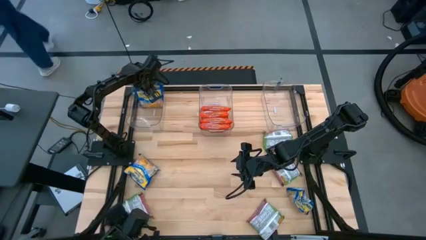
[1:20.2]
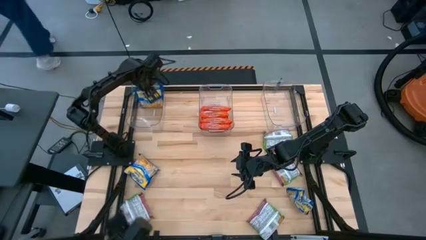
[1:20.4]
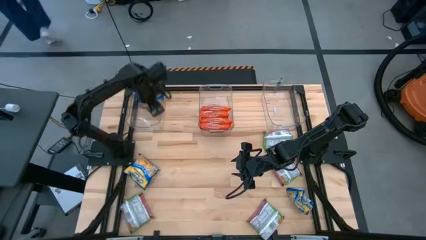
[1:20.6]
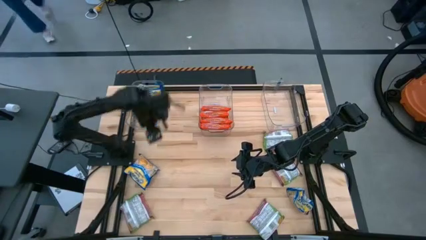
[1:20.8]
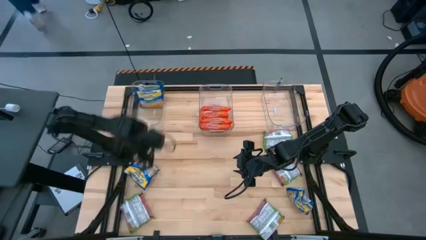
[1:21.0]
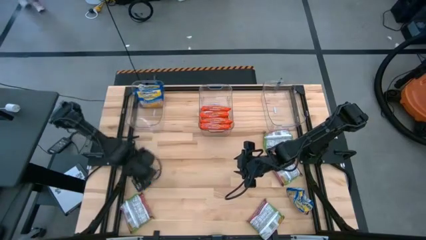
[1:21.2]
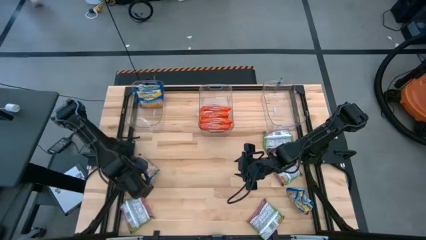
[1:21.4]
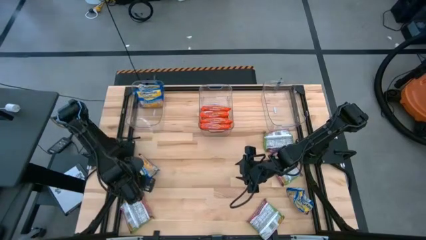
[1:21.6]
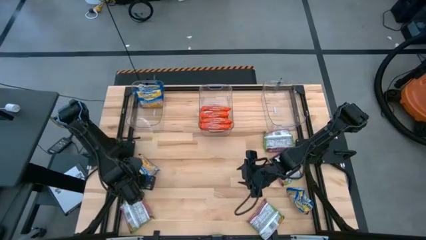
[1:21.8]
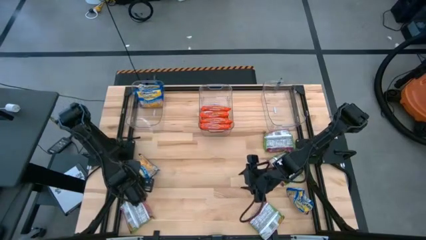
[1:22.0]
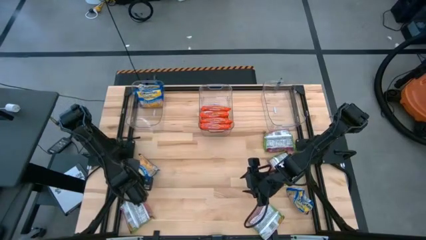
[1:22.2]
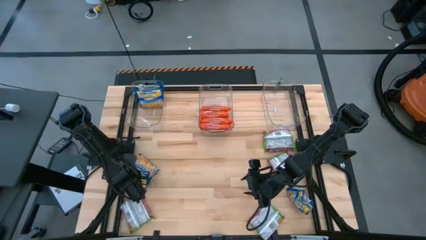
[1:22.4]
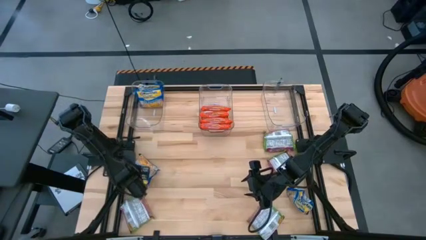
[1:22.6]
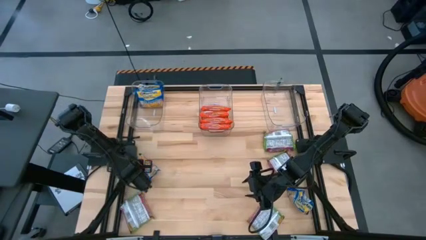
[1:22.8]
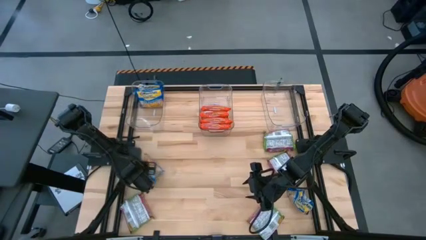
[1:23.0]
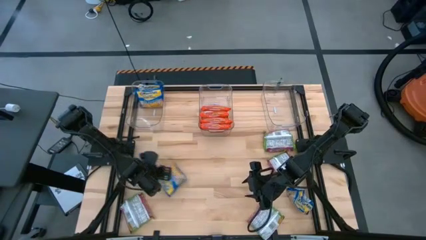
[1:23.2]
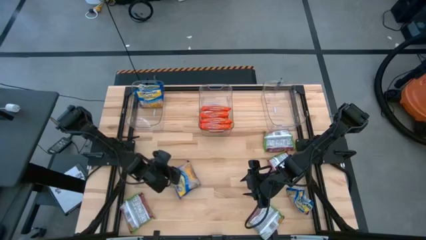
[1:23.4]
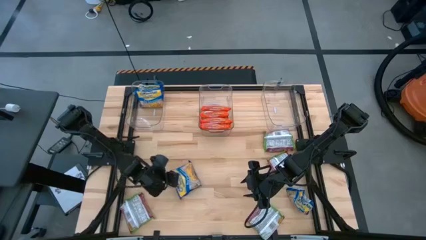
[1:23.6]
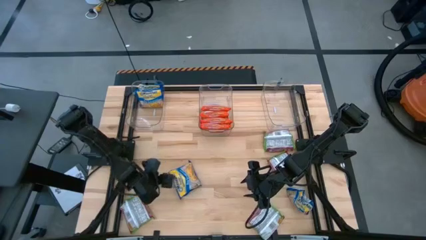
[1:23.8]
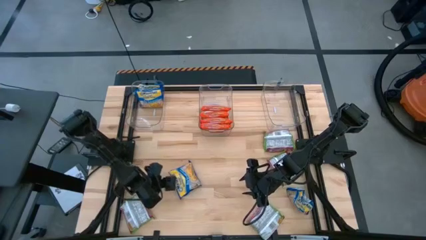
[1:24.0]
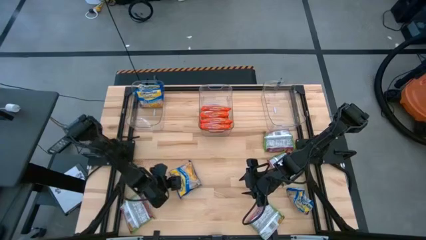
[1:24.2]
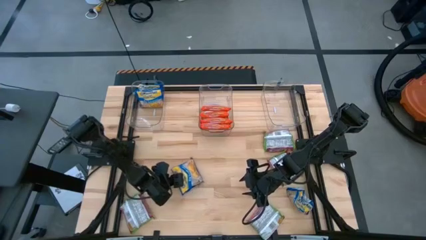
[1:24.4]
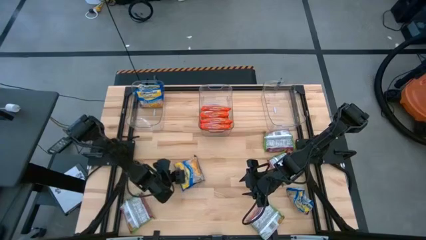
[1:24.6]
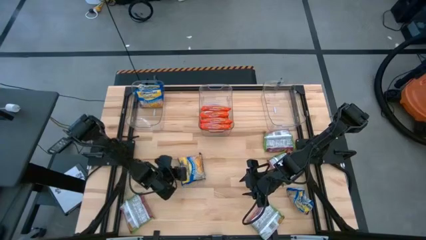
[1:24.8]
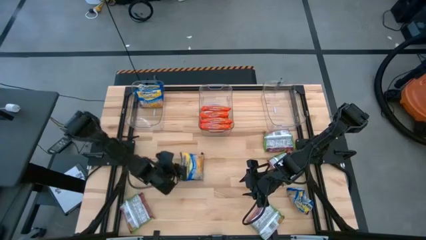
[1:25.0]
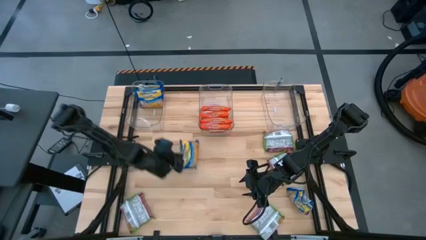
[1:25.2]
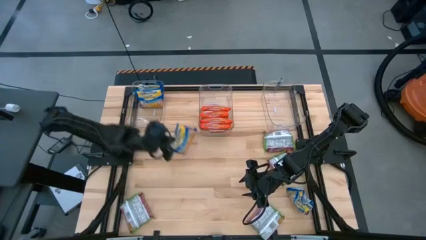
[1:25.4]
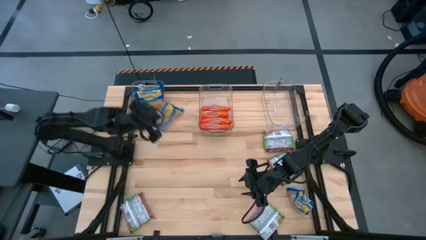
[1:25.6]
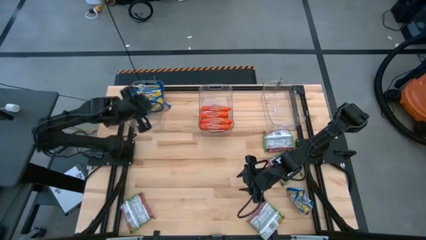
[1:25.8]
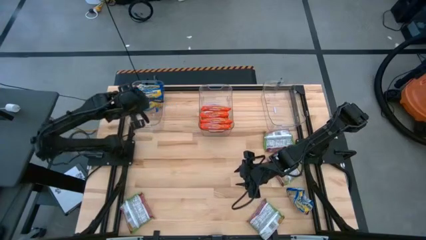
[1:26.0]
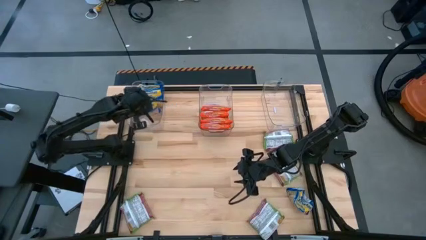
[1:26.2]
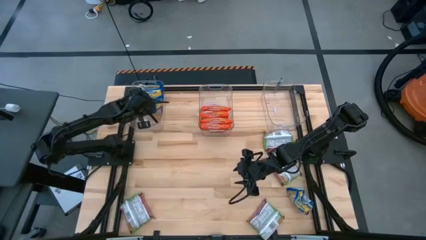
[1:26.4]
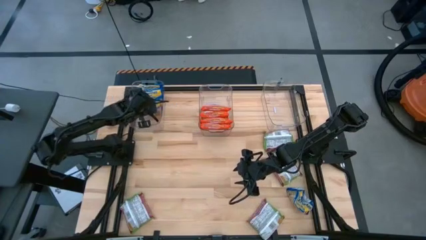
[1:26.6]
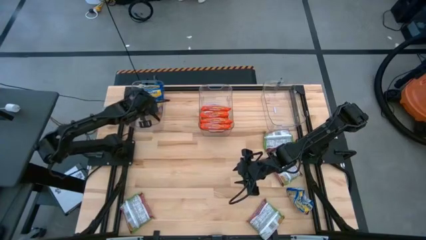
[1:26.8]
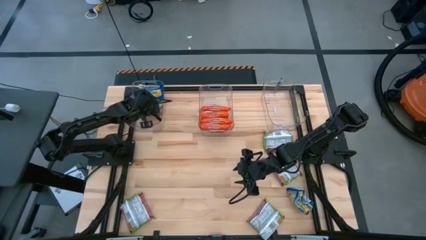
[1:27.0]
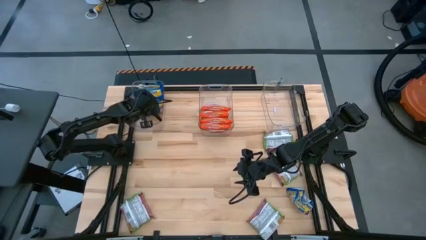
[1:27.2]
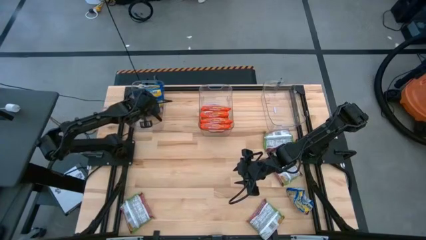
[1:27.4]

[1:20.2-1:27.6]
Task: Sort Maruchan noodles
Put the blue noodle pack into the left transparent bin

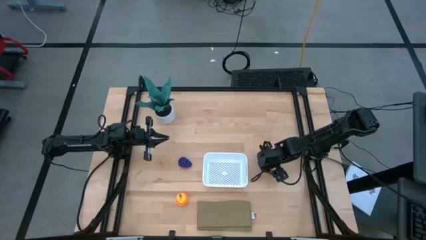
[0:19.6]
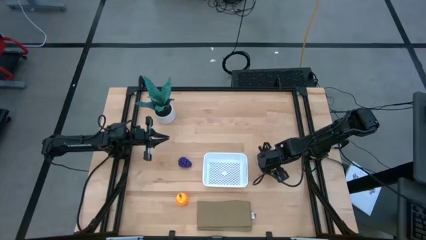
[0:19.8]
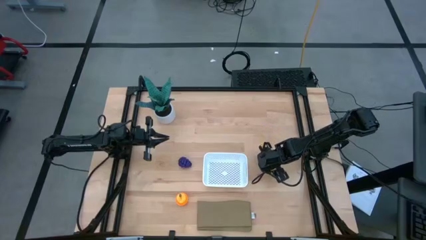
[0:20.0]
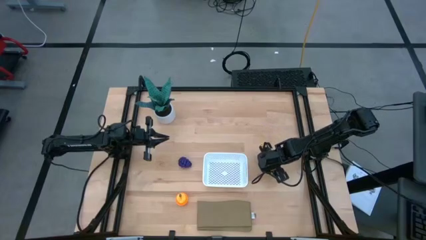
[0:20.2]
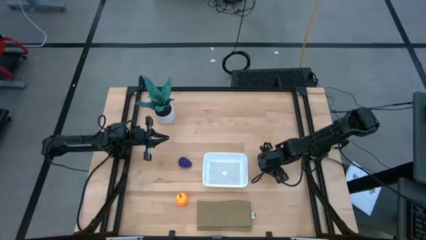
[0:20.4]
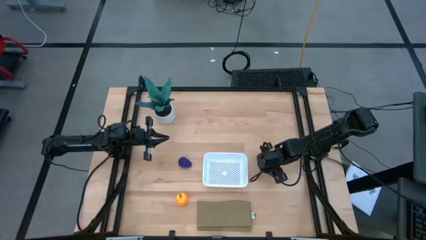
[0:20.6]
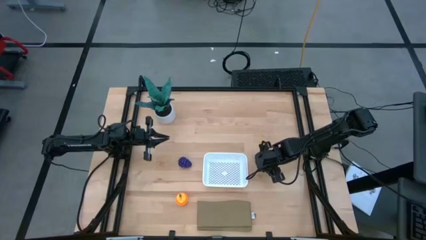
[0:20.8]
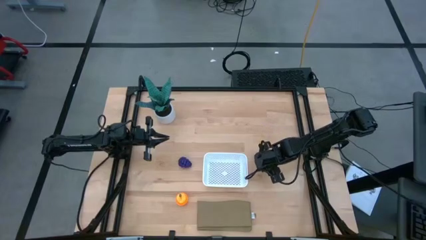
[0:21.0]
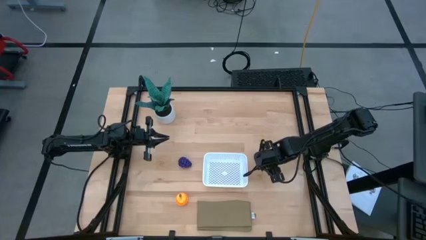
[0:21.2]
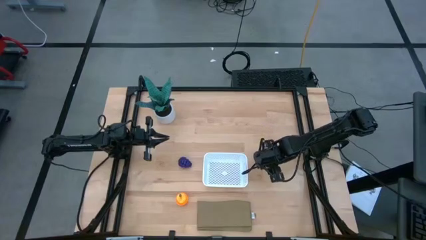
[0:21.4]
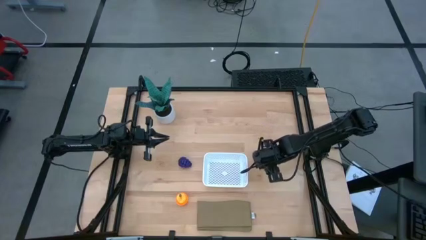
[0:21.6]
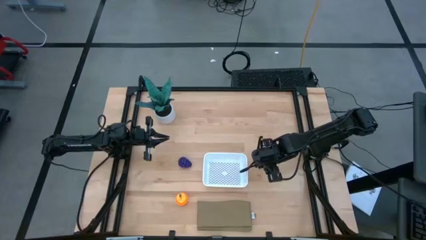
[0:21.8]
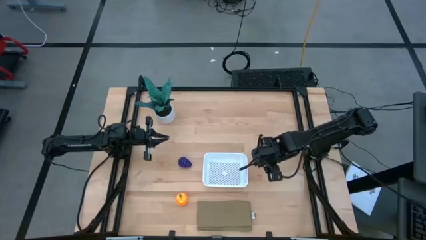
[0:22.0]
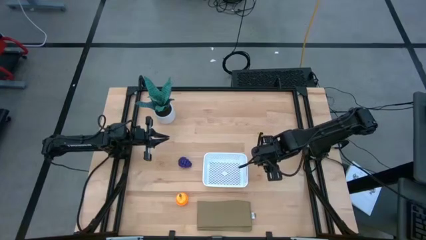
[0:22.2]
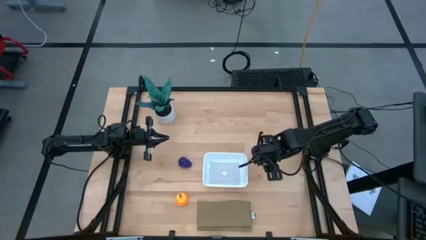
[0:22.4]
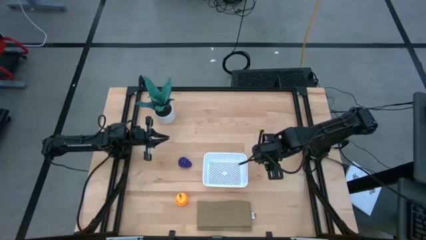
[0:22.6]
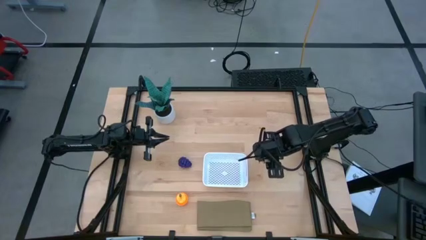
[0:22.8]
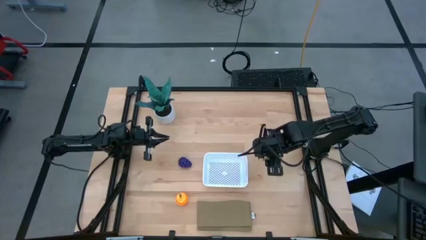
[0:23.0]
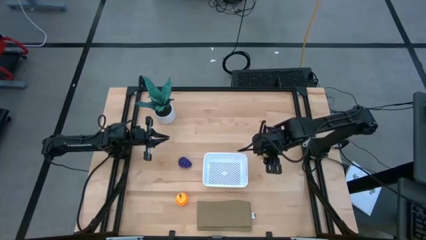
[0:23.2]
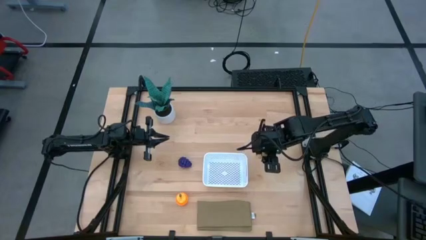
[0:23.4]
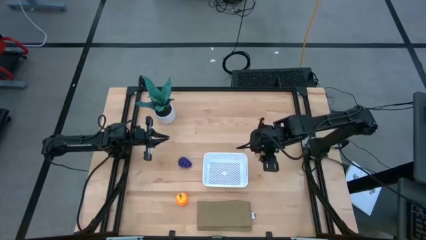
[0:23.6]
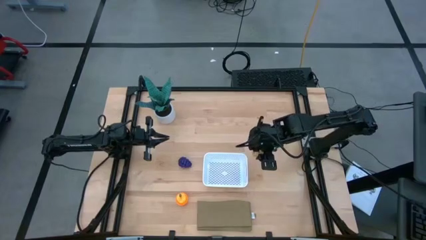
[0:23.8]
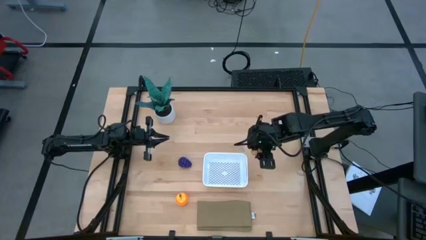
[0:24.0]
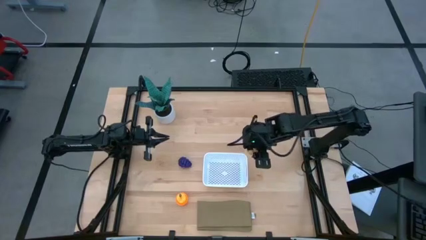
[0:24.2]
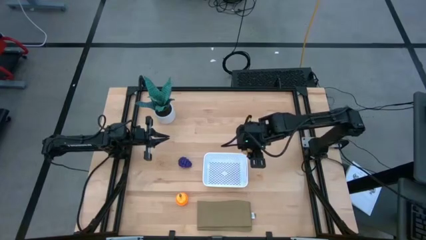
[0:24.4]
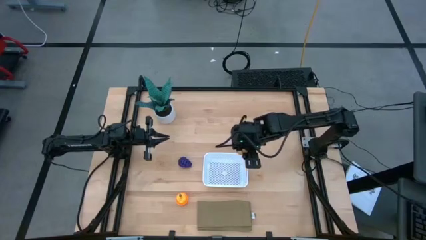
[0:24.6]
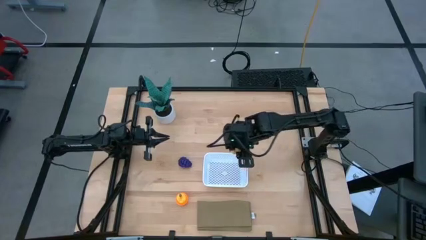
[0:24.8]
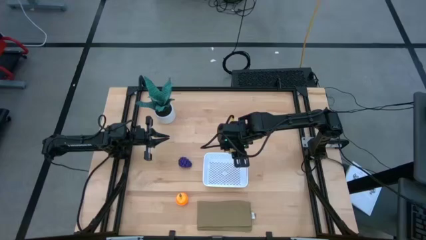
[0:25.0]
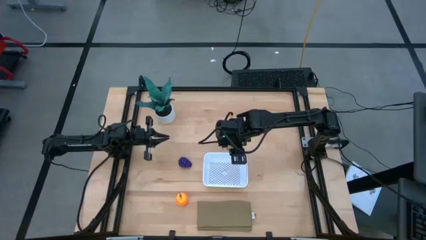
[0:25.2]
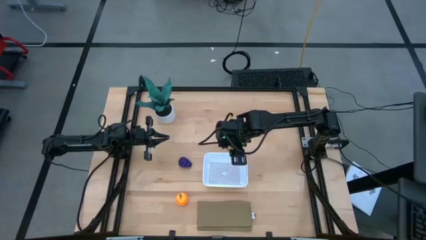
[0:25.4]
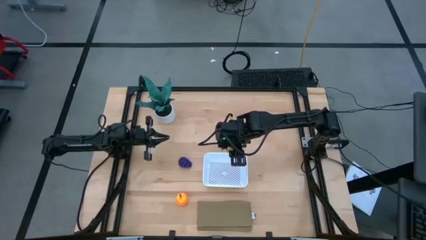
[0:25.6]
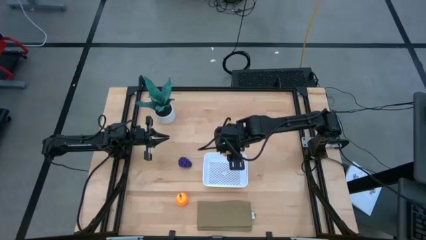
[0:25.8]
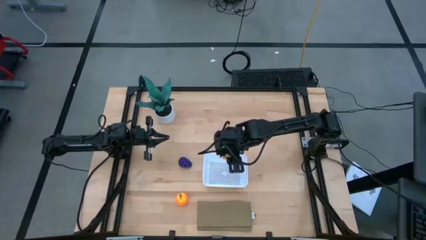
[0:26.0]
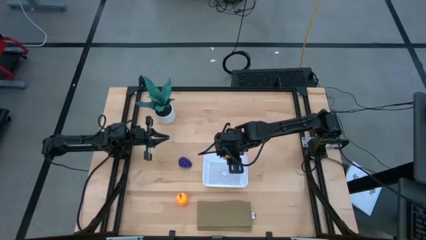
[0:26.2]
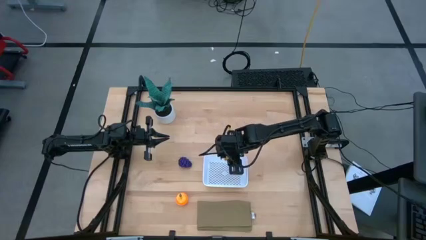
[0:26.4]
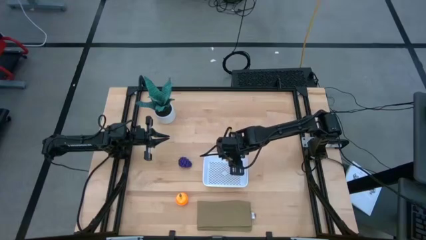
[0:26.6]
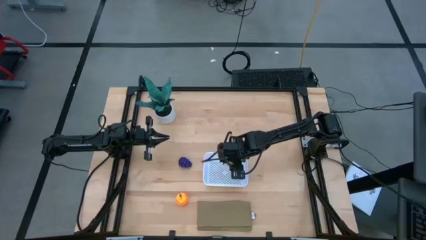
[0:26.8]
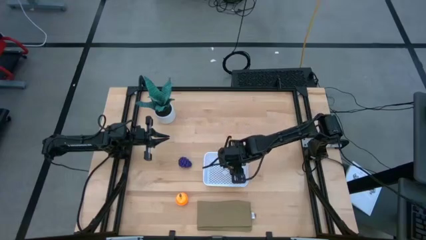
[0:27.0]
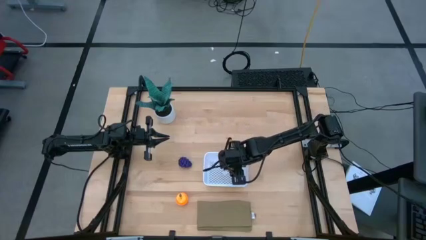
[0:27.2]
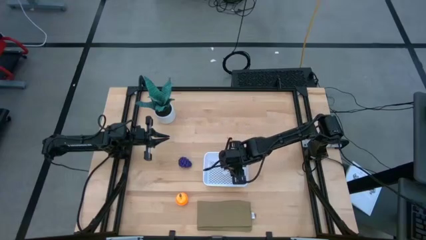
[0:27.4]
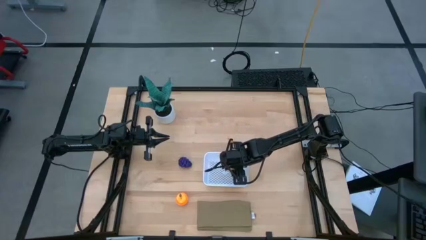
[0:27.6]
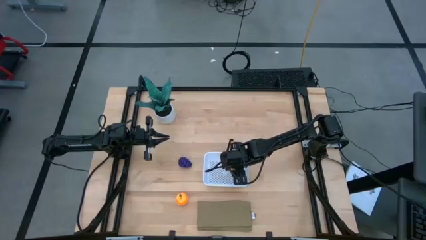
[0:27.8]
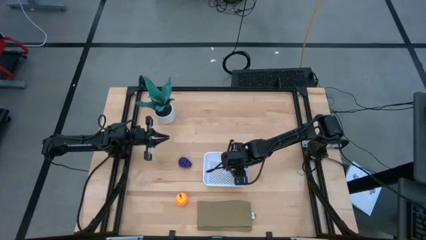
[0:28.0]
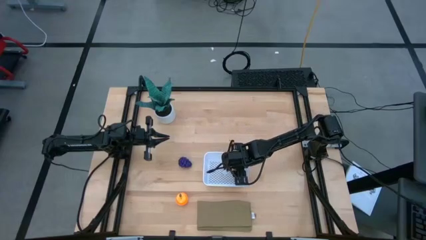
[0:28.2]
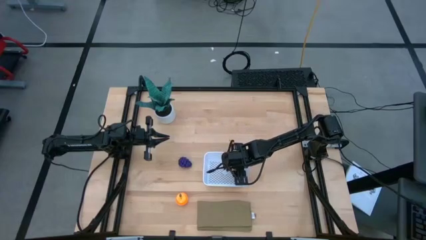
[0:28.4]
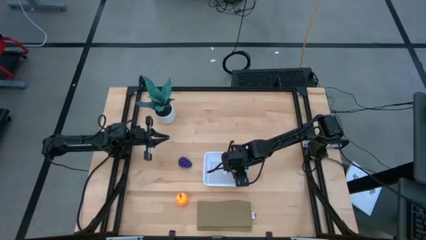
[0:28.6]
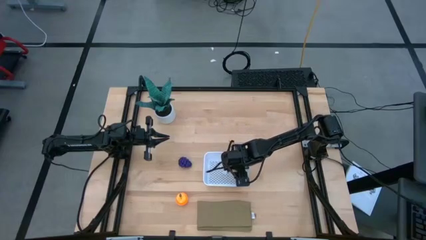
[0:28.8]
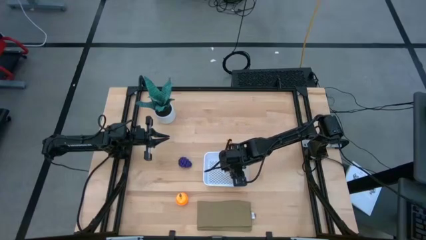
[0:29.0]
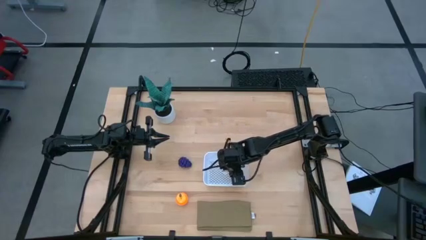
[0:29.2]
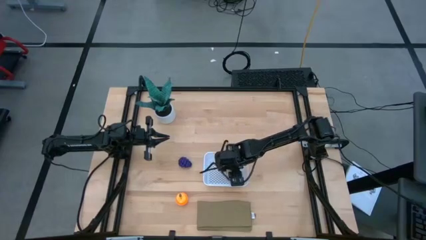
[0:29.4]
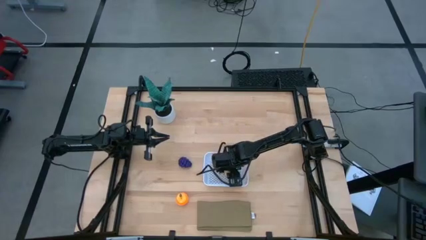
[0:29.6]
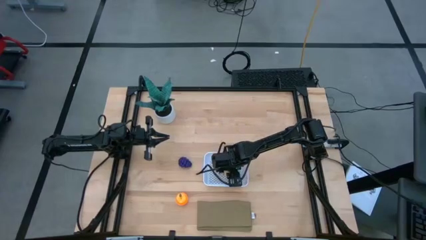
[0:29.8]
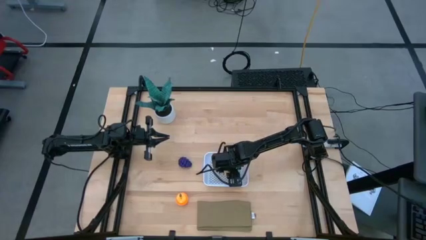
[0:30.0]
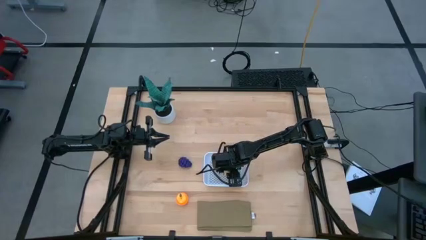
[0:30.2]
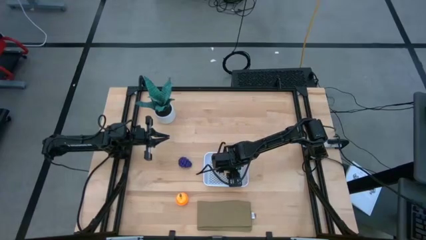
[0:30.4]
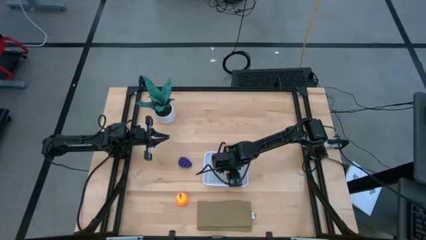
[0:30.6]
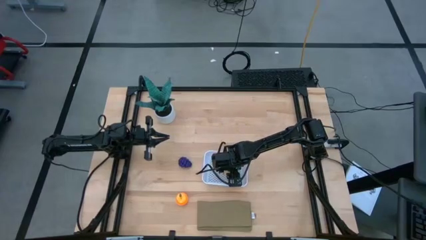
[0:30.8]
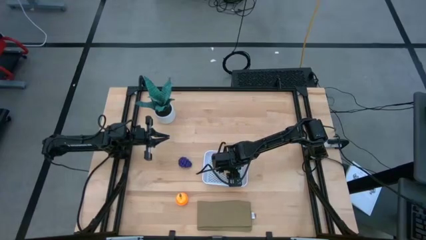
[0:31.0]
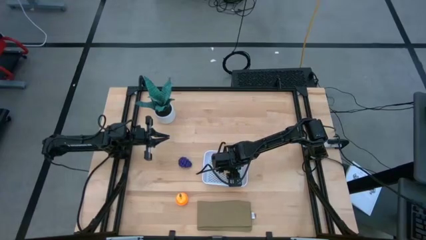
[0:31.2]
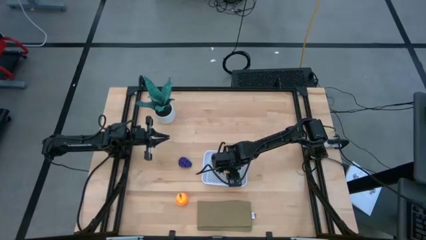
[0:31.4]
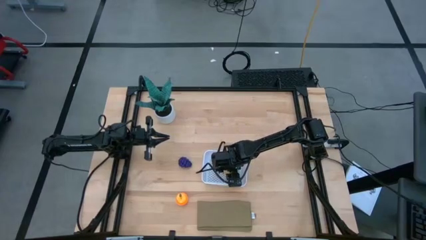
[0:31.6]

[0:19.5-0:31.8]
Task: Pick and placing Produce into tupperware
Put the potato into the white basket
